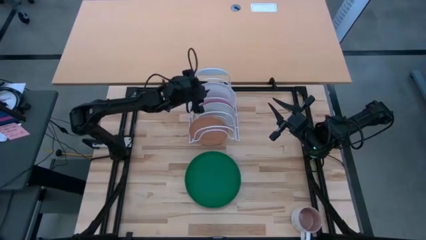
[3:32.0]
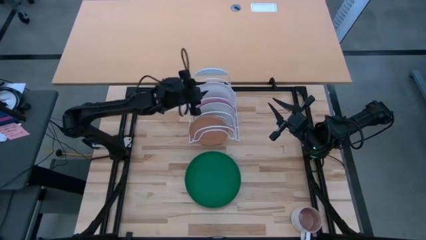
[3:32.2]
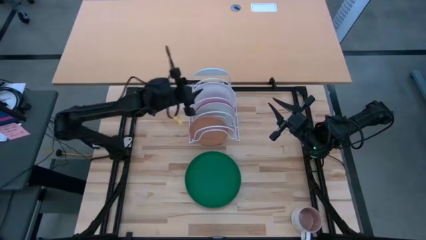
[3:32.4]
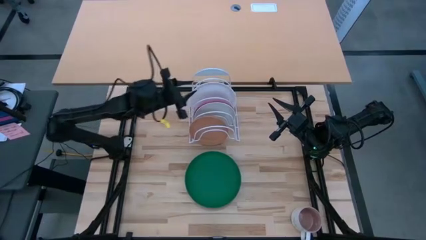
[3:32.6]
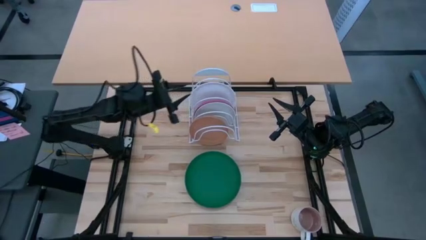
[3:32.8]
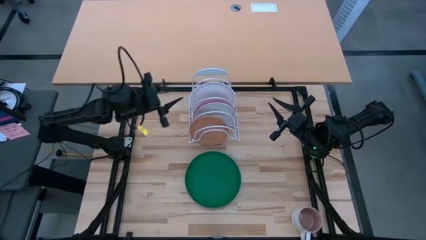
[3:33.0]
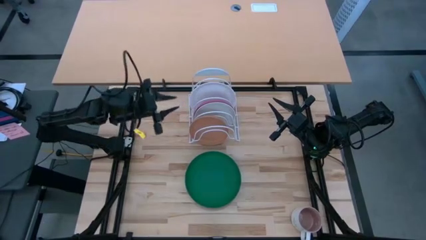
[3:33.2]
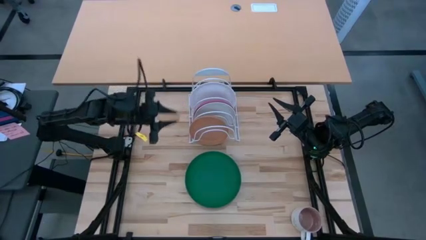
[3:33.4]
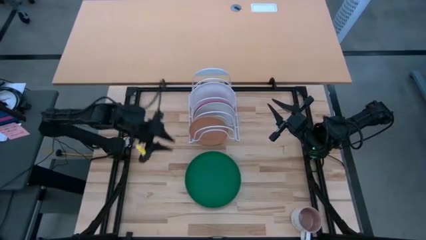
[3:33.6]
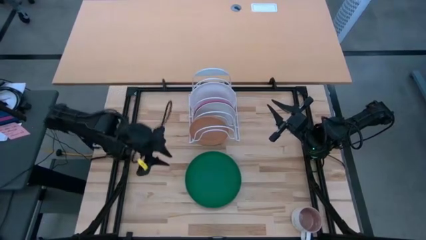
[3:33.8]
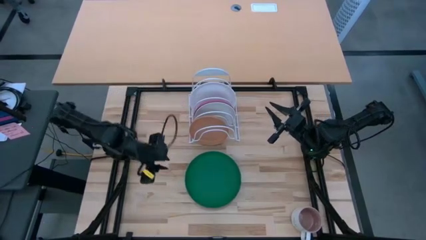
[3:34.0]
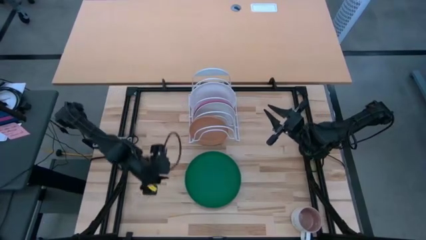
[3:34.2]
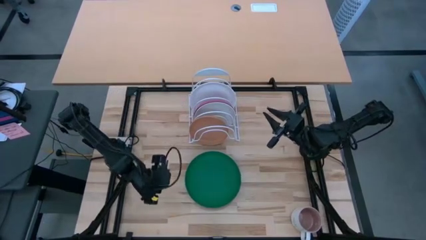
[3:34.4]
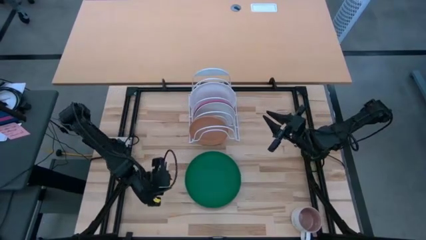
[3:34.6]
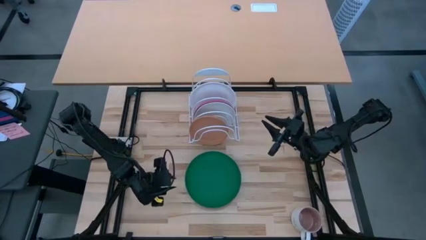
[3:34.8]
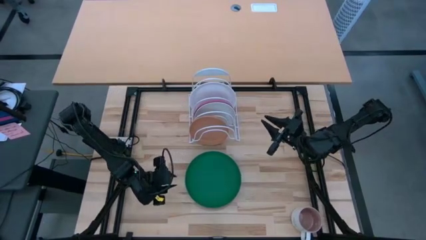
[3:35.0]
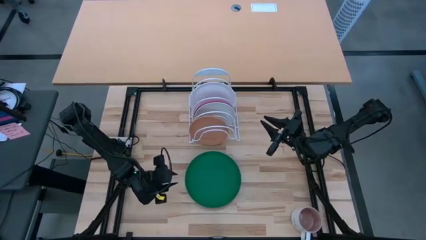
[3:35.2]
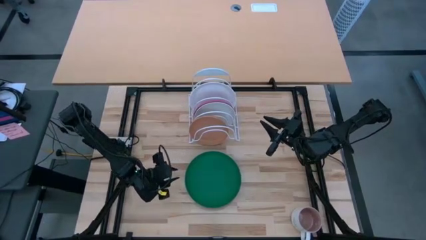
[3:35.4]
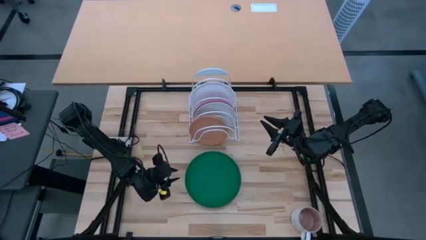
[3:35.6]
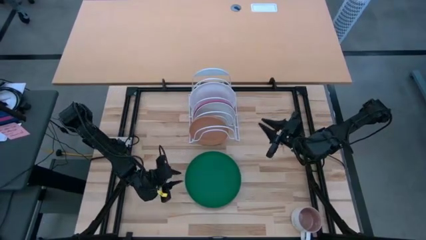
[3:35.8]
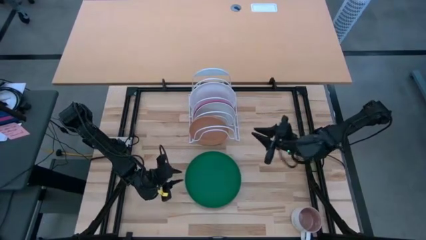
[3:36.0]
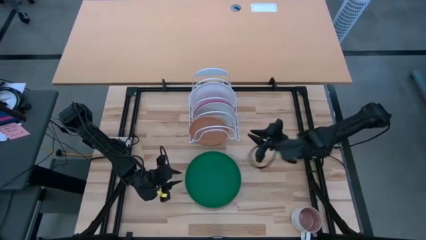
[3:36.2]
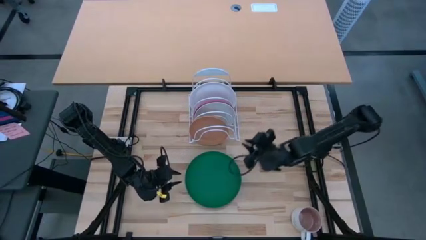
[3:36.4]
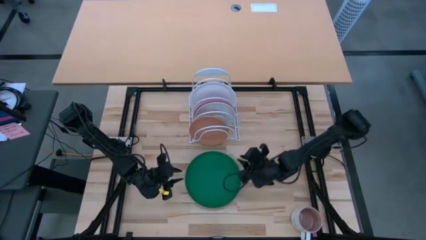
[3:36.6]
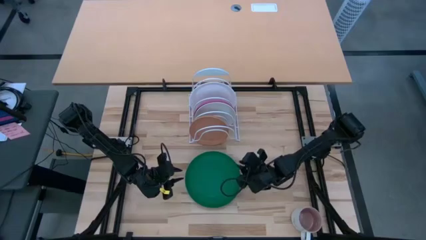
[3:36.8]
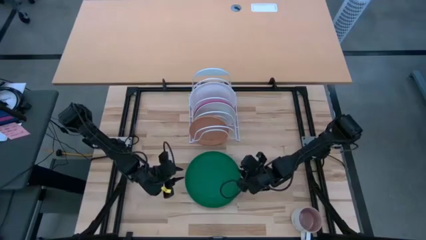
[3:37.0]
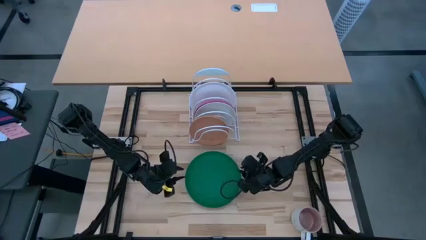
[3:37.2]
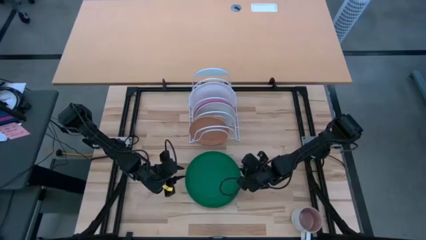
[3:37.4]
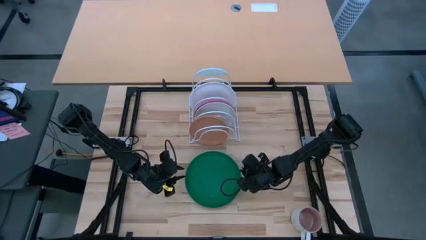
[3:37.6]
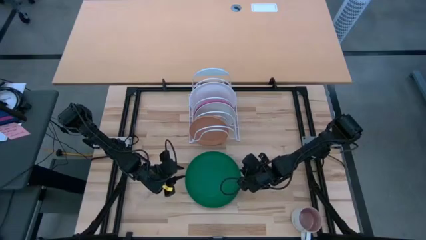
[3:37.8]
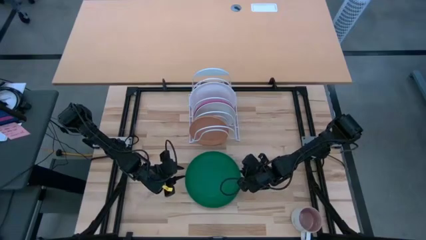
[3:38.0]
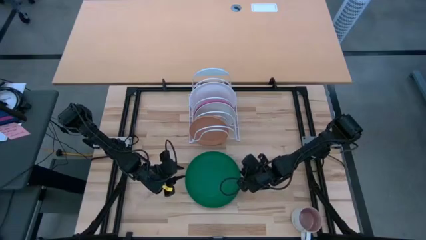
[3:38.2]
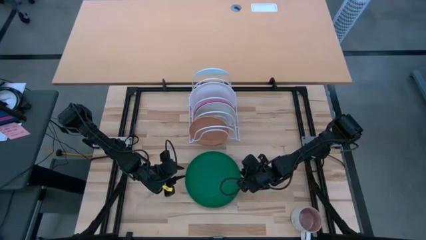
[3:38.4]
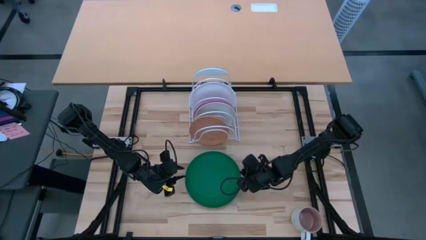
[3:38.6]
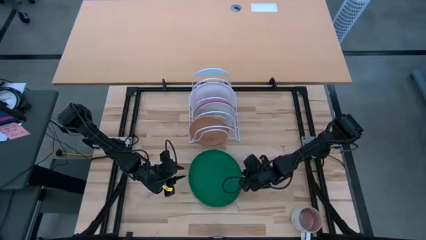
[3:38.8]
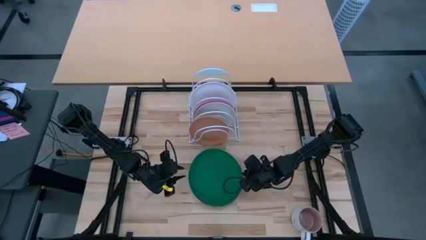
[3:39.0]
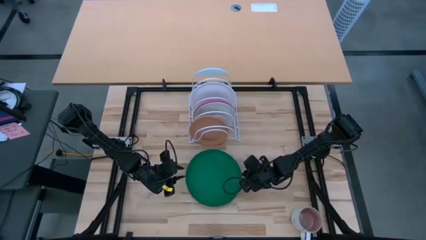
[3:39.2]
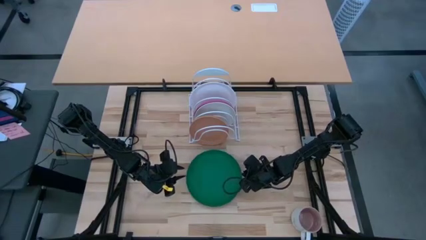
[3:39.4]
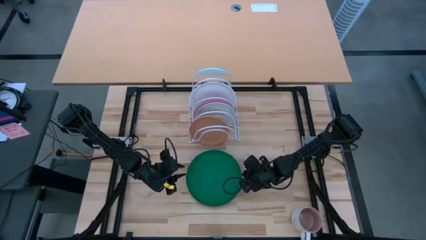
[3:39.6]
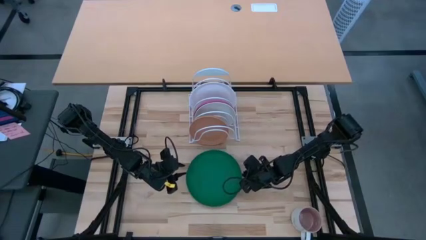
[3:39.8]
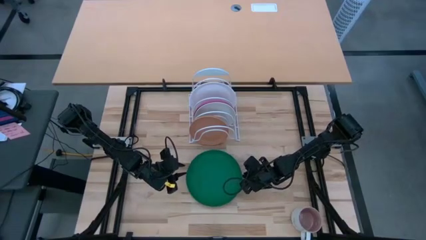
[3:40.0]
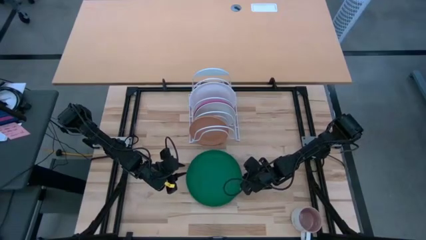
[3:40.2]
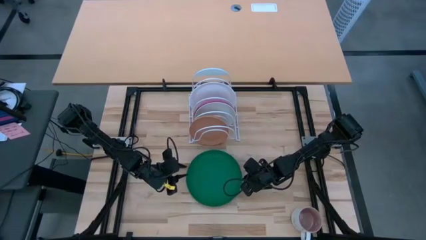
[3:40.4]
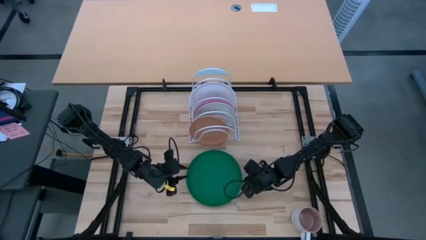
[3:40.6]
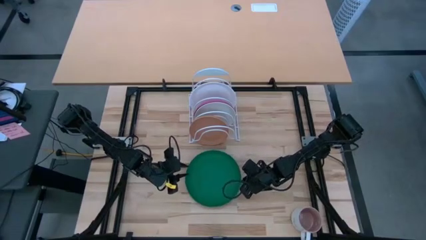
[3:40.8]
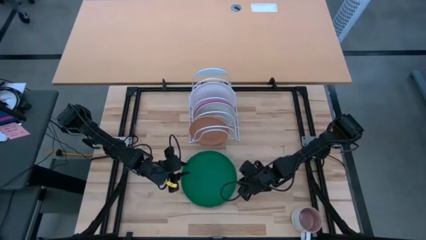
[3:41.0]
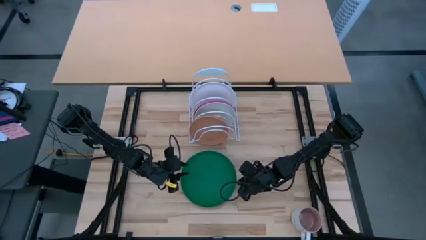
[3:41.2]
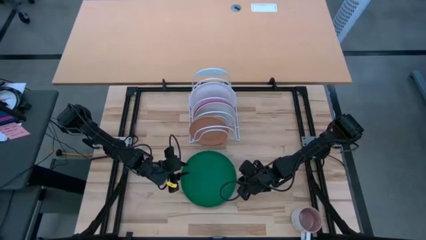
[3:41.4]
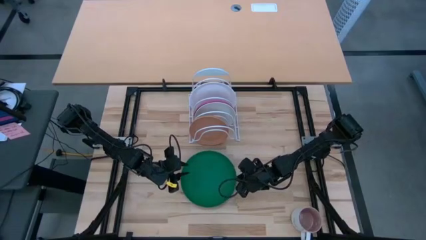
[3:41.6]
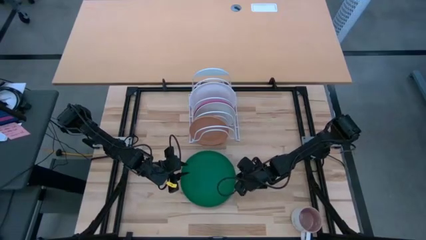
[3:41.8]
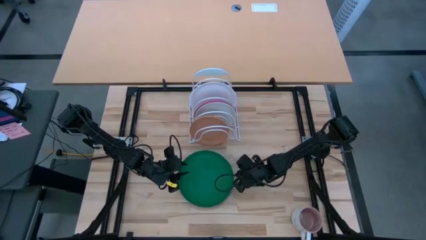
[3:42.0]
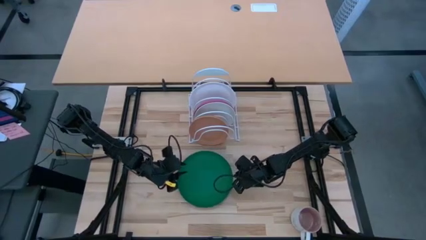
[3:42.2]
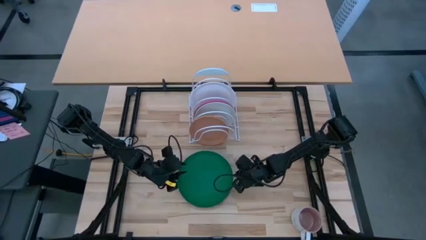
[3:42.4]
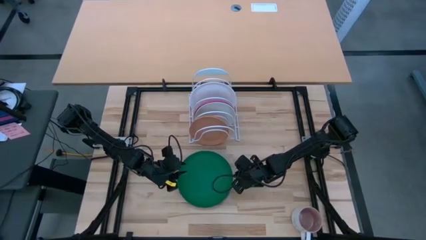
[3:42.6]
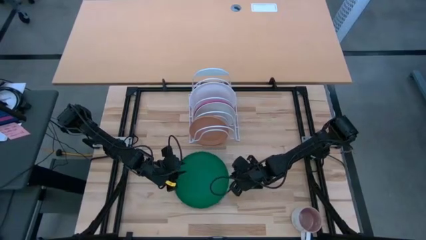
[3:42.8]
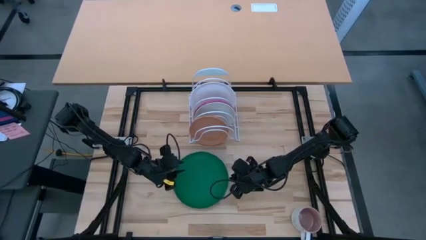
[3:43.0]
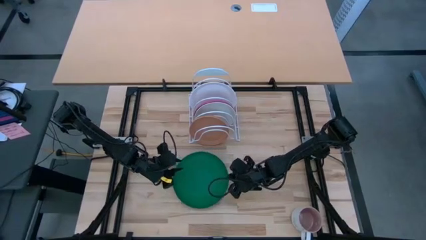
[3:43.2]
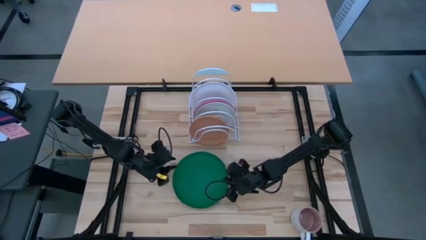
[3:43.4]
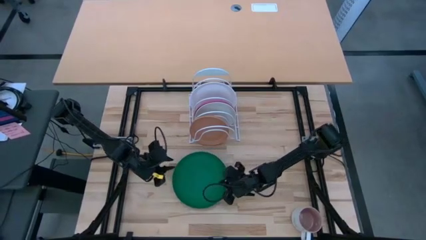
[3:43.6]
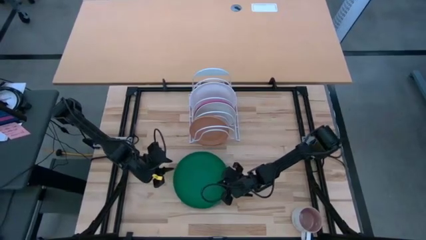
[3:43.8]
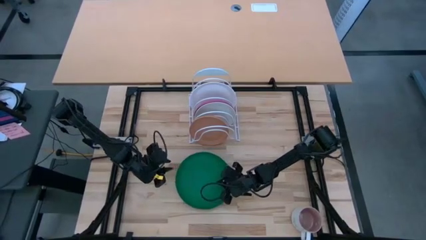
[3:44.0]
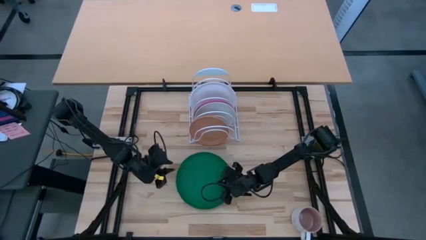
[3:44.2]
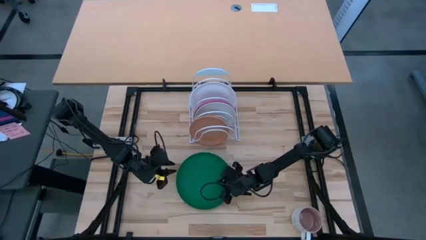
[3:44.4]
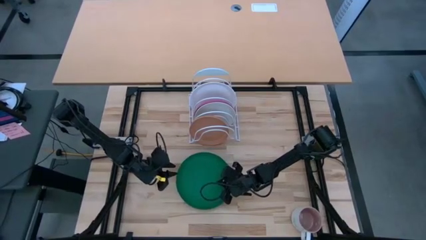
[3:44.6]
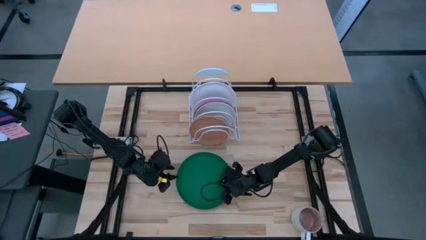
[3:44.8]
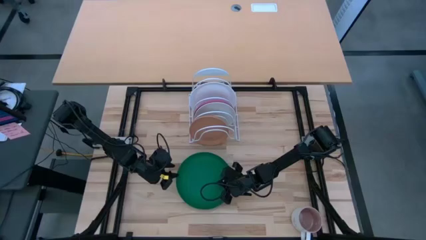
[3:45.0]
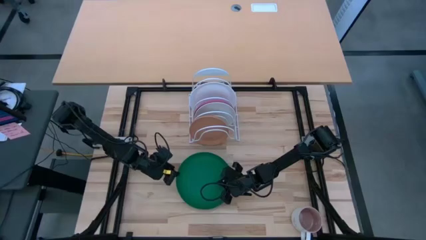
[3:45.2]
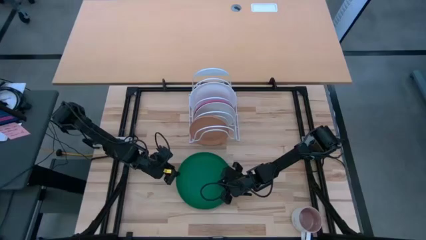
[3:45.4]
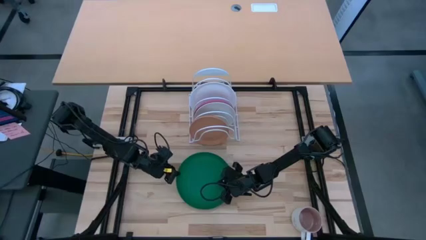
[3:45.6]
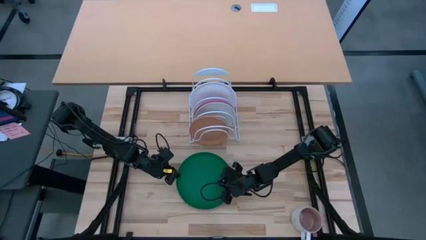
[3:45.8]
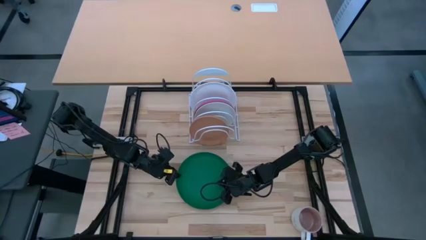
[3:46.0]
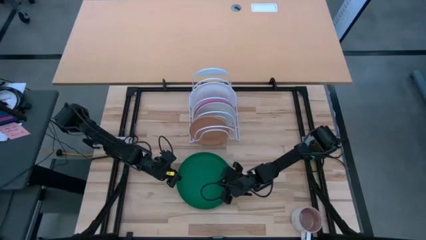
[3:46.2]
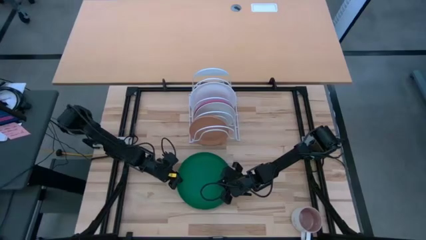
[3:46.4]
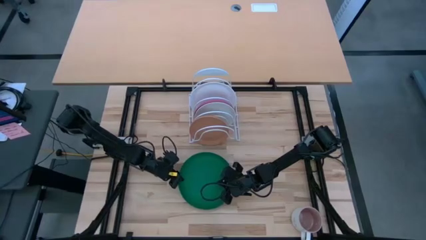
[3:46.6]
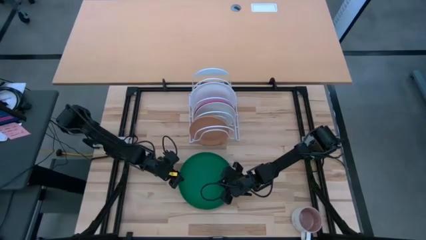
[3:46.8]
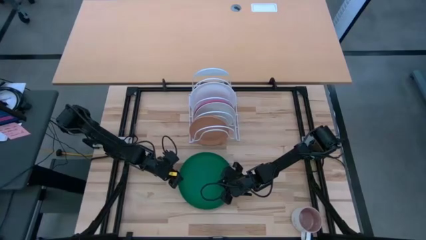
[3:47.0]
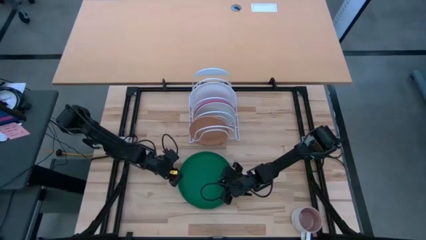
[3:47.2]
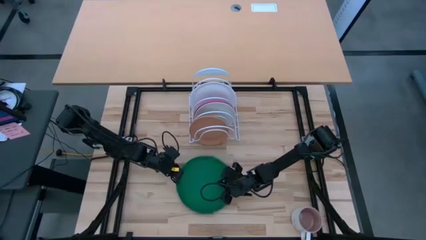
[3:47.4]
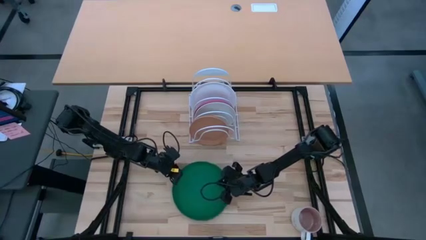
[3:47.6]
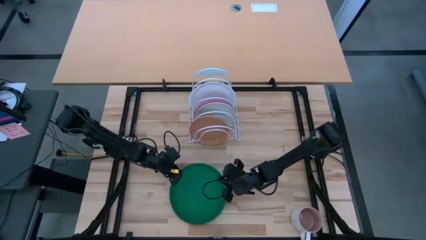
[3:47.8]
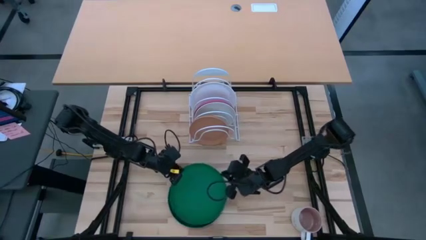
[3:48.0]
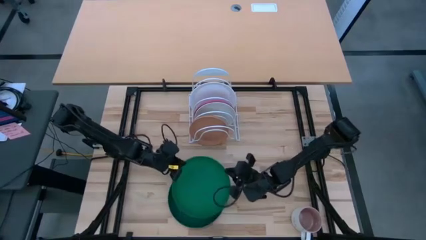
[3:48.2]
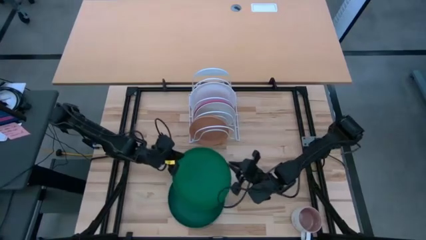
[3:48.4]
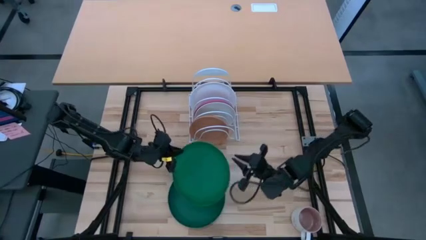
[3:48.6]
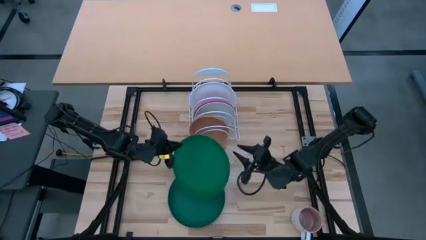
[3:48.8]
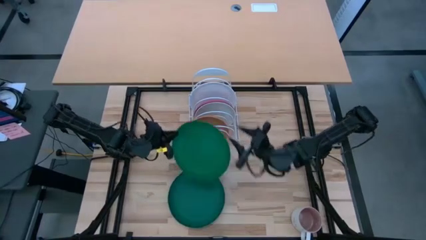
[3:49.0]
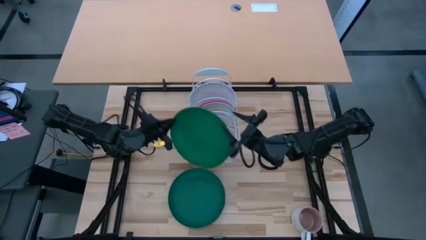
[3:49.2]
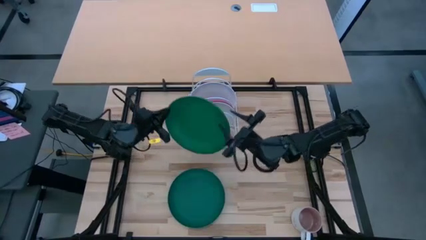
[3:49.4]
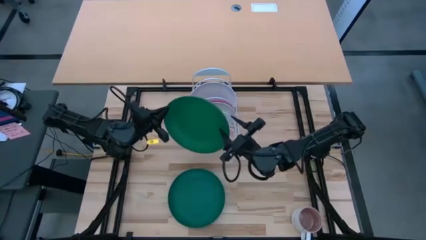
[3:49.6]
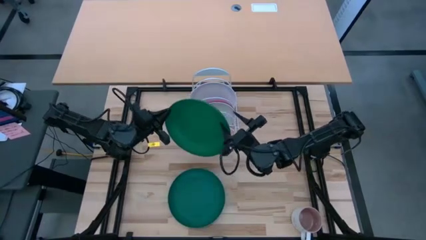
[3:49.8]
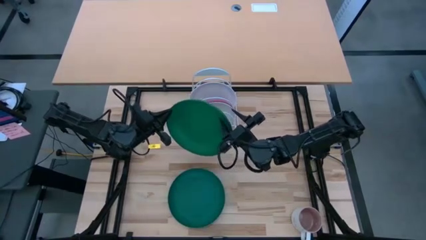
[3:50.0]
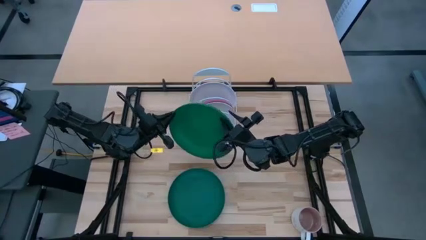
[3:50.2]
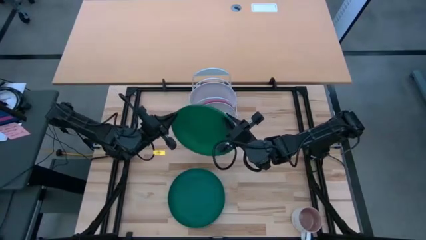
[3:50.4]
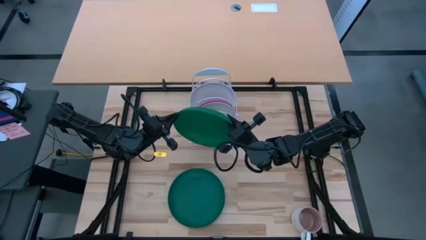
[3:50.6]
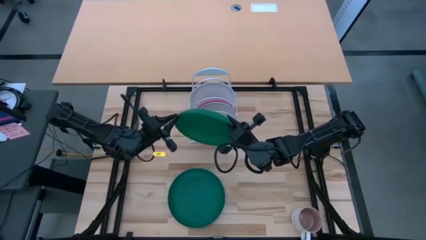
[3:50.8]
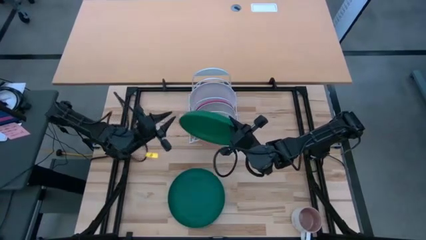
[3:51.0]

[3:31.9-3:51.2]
Task: Sort dishes
Put the green plate on the dish rack
